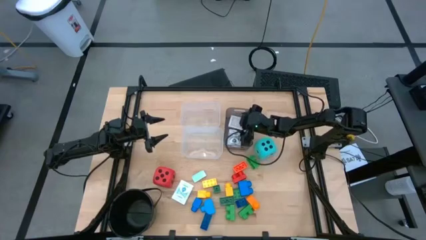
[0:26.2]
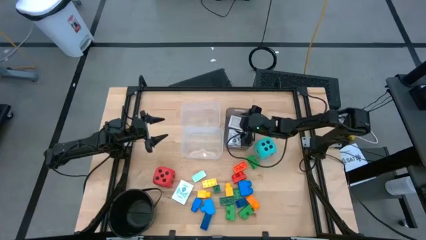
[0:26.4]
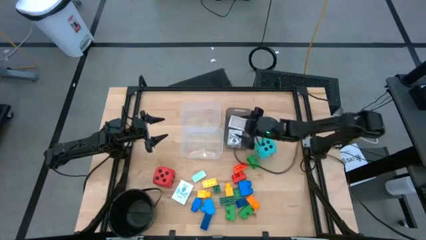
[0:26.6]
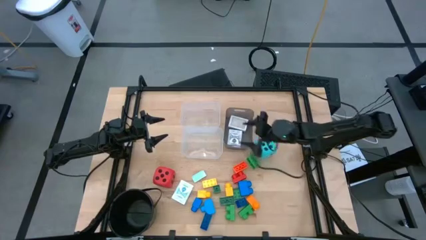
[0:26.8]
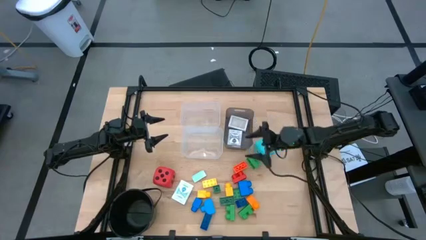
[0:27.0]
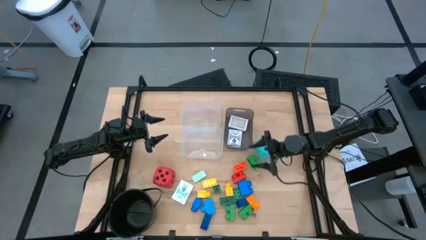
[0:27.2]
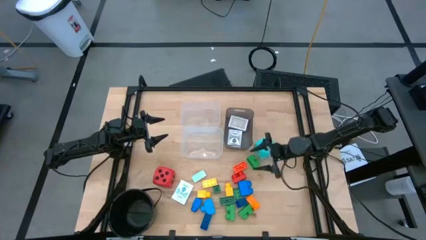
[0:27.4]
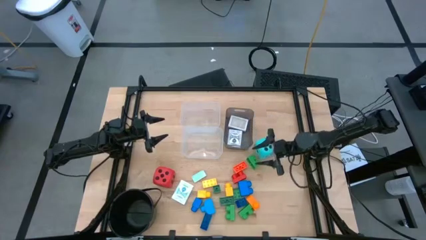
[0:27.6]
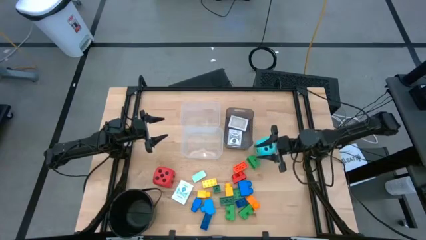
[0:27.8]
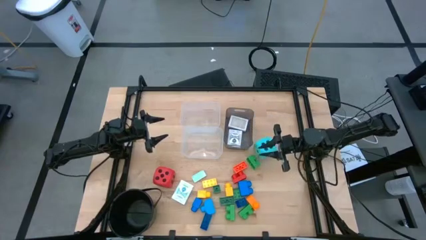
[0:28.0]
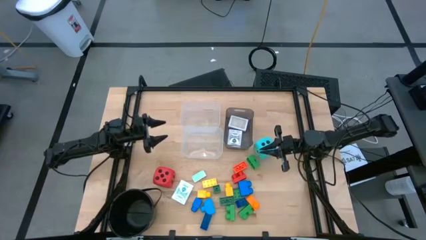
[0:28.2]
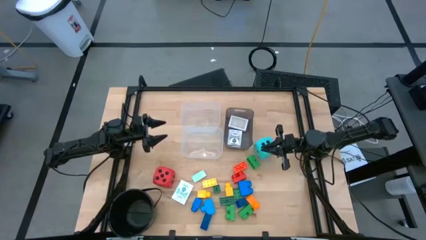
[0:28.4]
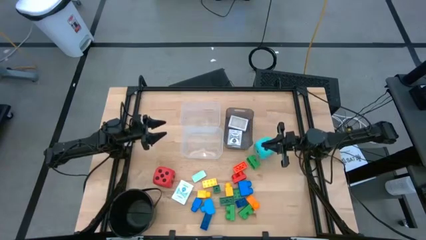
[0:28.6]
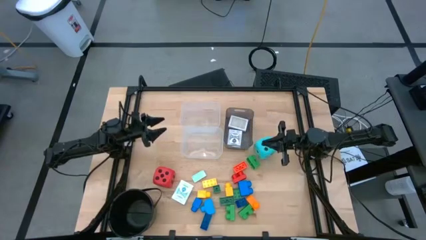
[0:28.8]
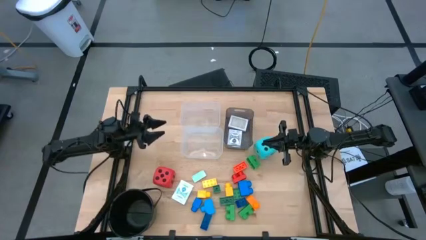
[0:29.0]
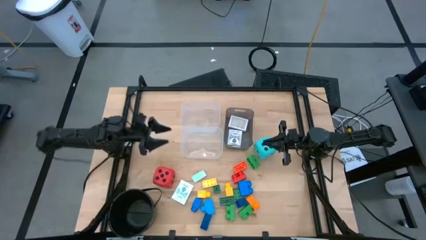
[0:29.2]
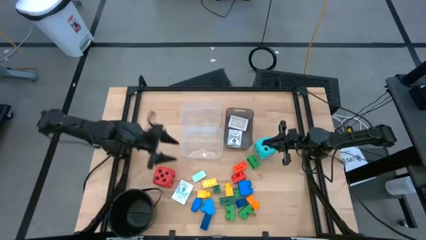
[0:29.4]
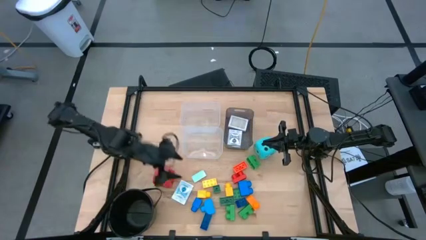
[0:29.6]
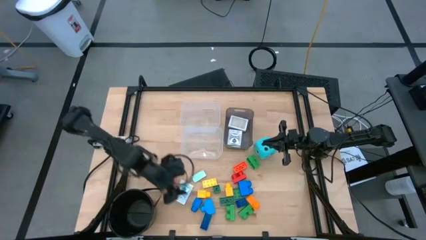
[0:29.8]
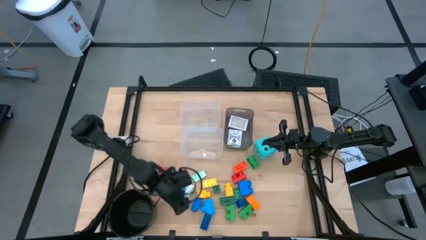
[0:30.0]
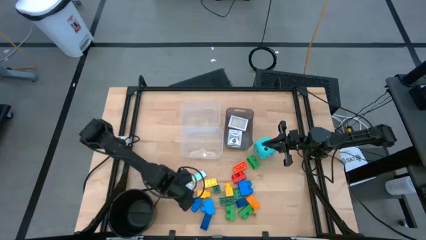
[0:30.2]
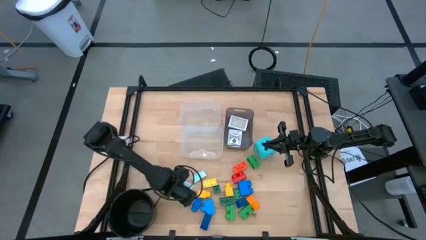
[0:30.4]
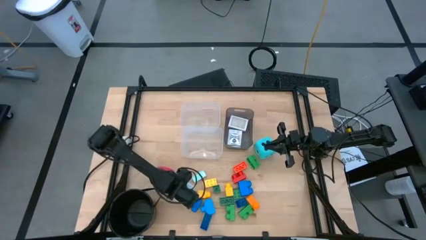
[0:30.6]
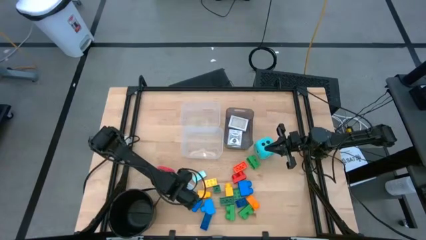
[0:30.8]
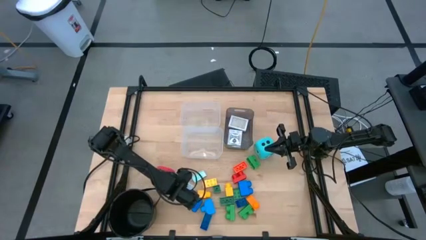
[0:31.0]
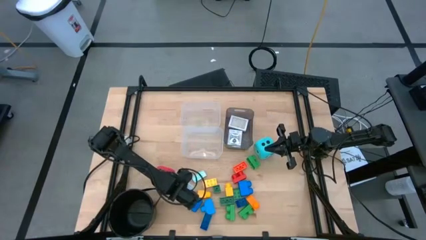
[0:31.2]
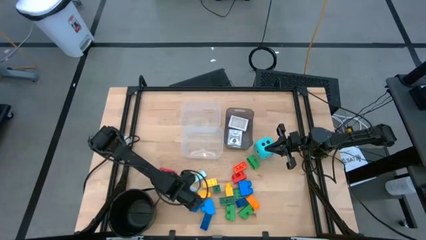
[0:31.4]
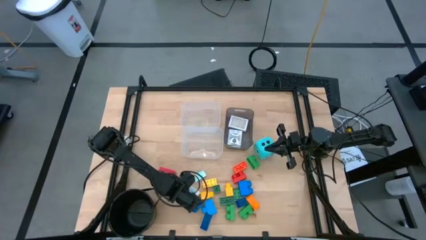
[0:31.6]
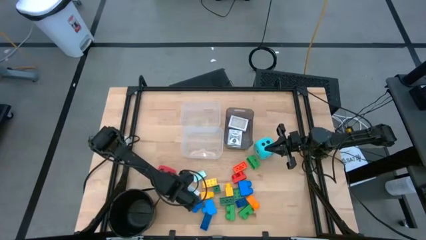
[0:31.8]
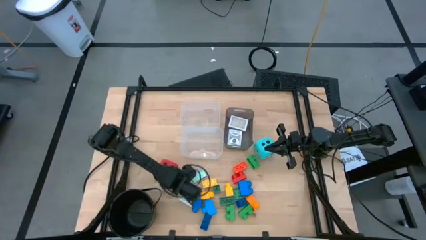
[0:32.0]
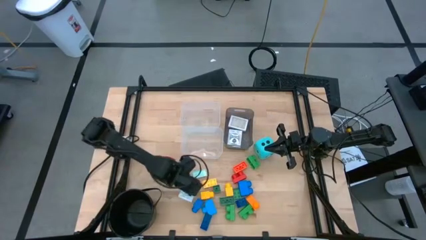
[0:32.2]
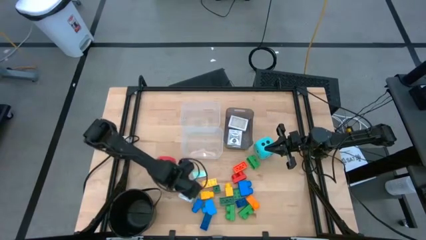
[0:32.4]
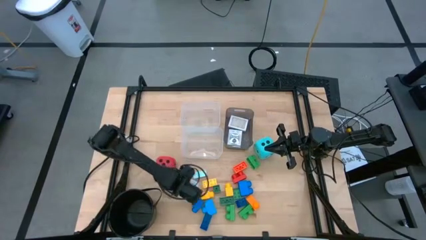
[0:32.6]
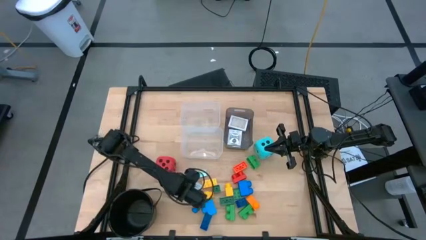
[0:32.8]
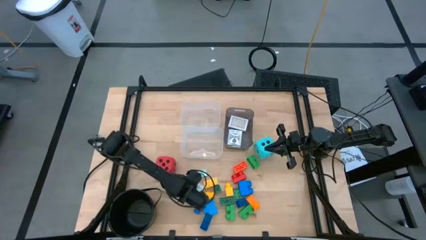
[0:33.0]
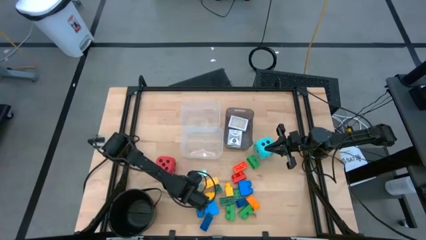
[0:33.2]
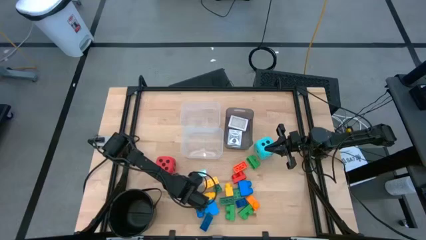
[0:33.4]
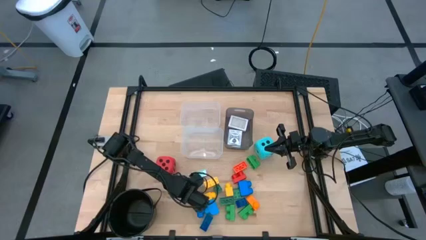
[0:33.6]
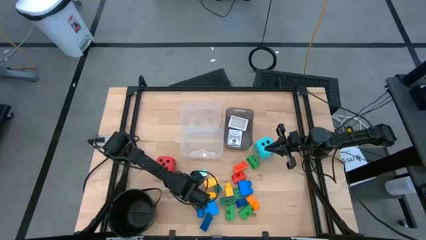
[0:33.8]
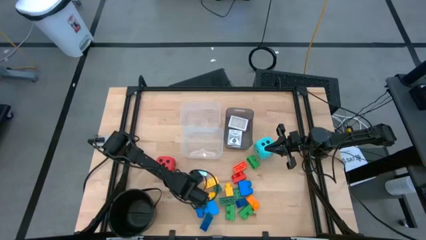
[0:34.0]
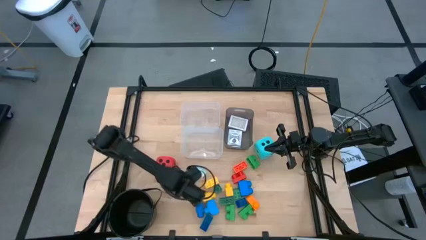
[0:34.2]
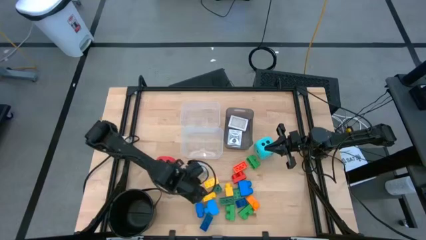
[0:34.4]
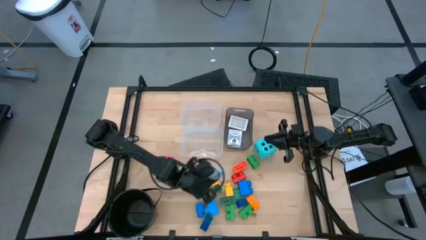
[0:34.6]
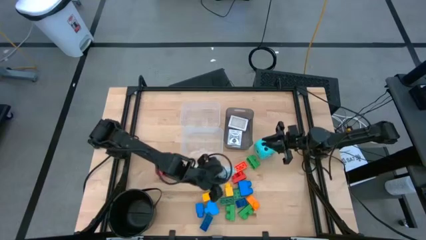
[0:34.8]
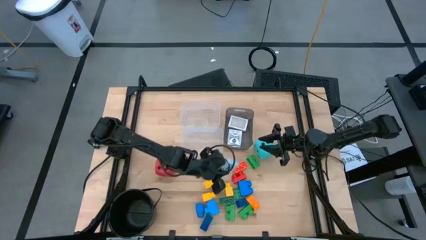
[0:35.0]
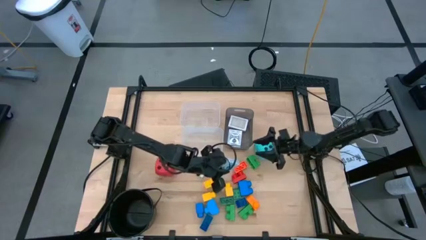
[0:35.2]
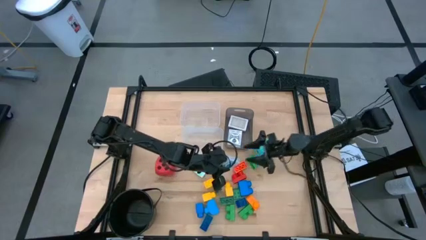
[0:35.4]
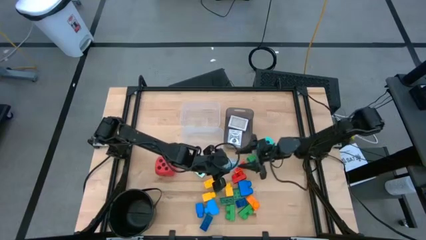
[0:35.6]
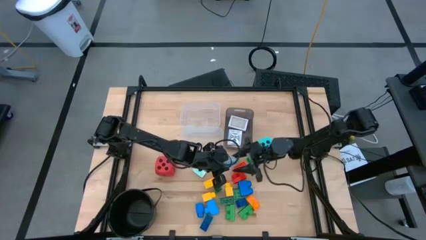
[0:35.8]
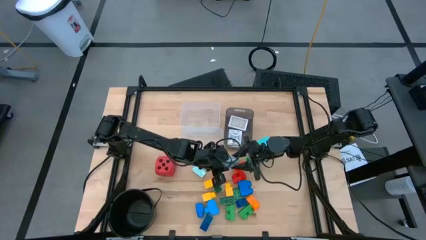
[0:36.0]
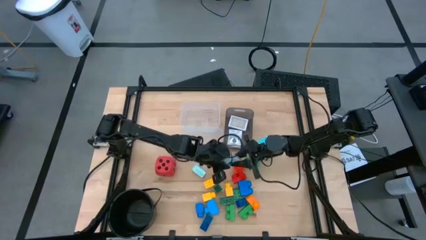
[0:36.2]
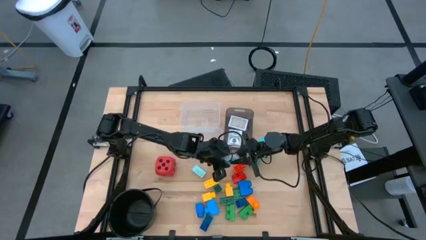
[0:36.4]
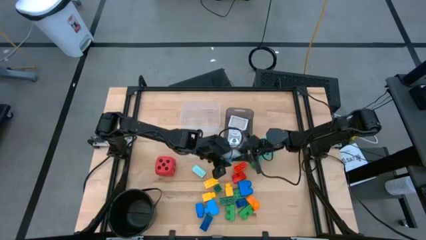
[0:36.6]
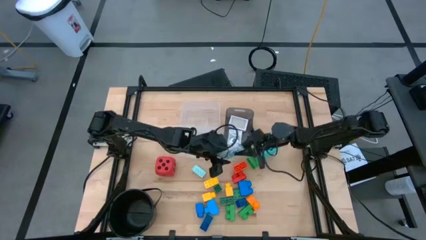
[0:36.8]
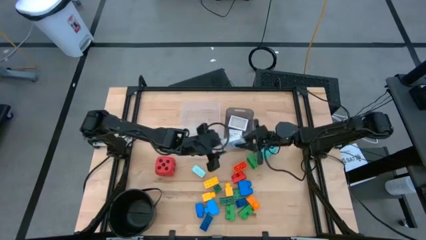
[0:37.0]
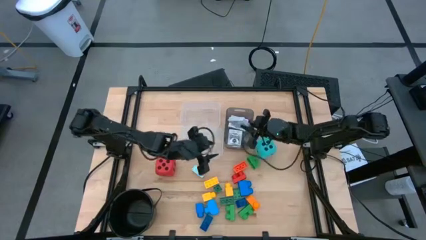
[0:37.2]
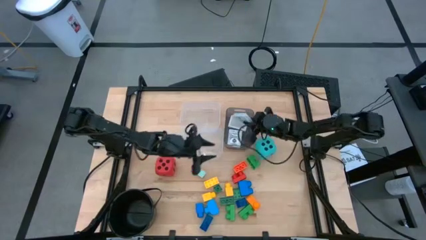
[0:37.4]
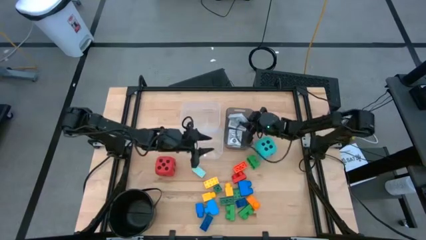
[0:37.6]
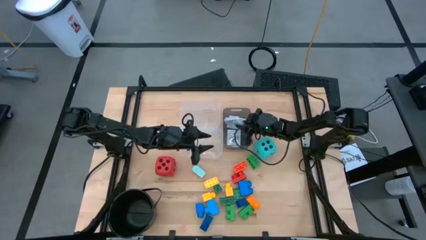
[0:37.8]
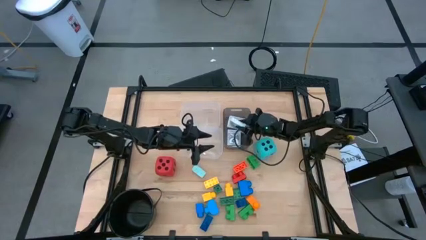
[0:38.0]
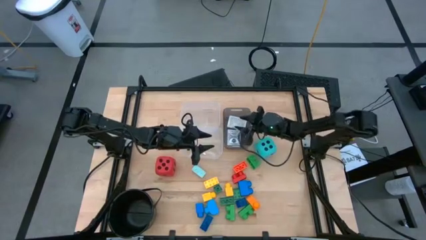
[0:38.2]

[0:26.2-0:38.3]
Task: Pick & Place Toys
Put the blue deck of cards into the black bin

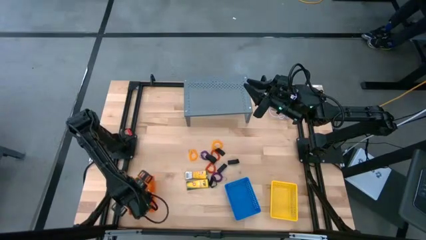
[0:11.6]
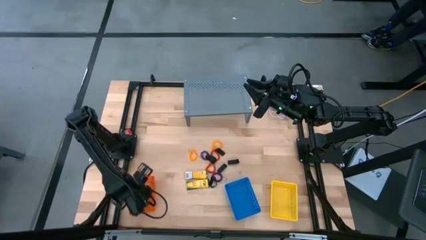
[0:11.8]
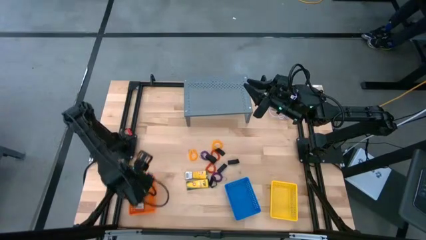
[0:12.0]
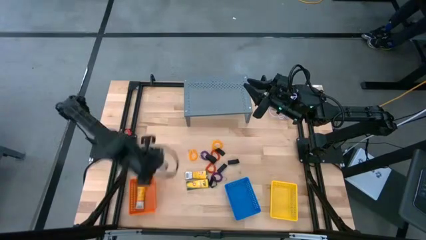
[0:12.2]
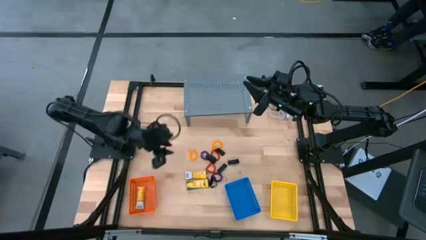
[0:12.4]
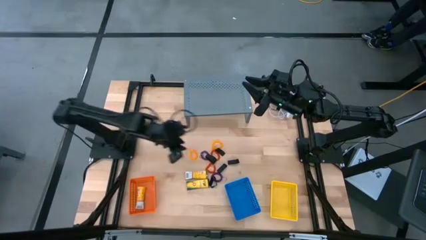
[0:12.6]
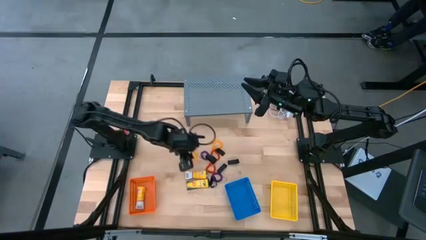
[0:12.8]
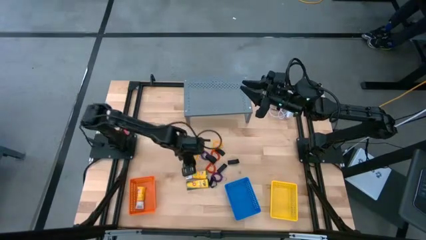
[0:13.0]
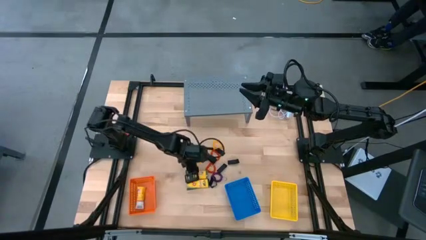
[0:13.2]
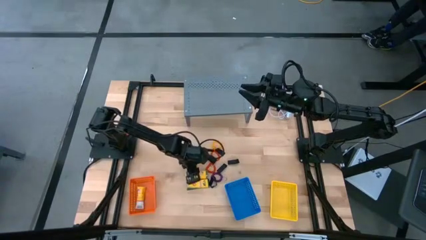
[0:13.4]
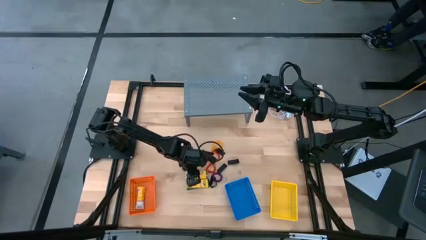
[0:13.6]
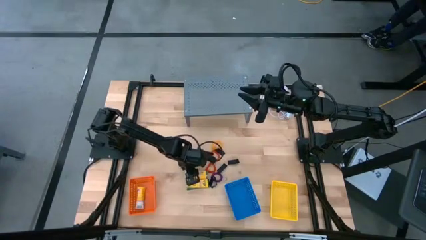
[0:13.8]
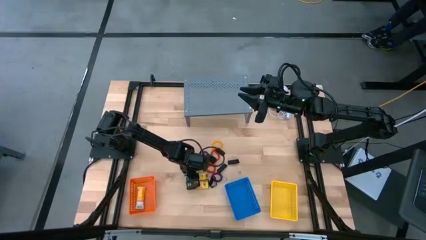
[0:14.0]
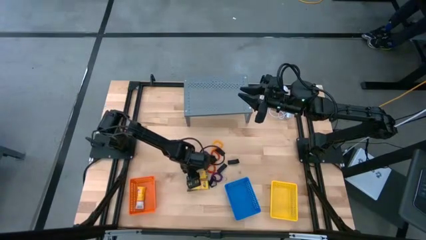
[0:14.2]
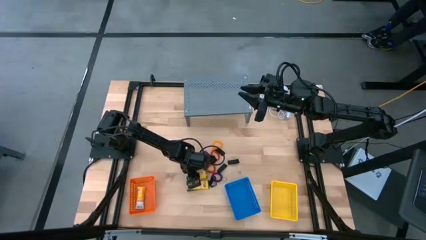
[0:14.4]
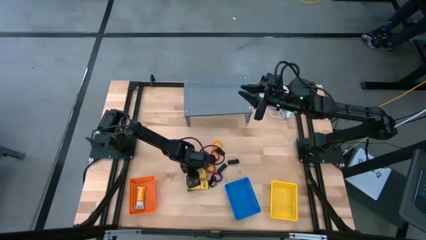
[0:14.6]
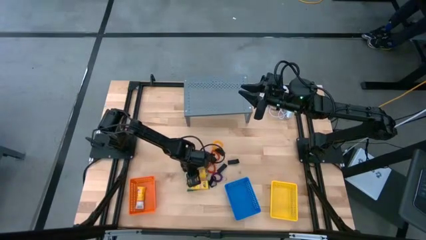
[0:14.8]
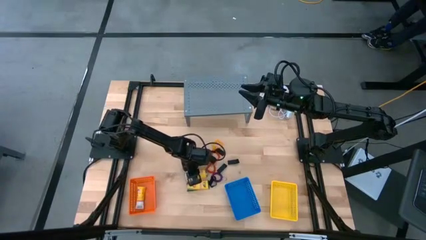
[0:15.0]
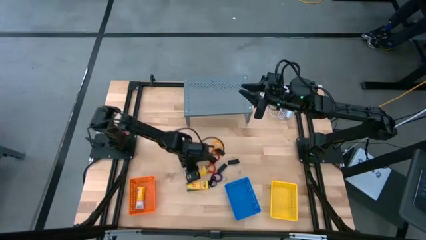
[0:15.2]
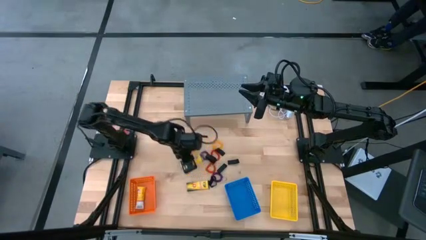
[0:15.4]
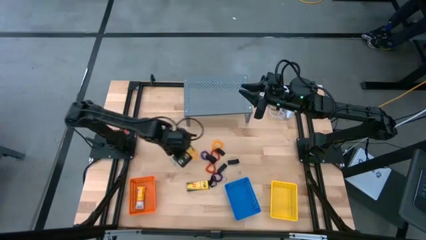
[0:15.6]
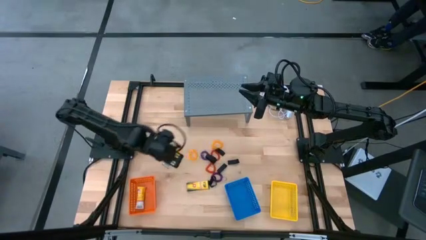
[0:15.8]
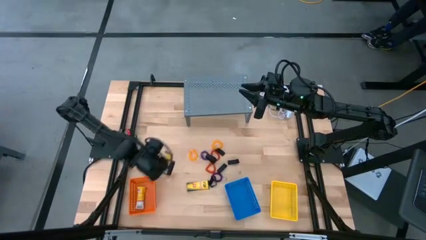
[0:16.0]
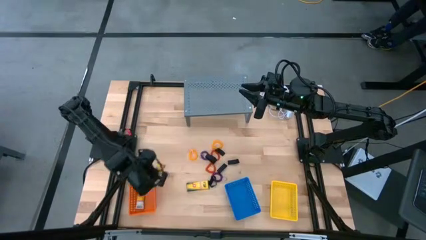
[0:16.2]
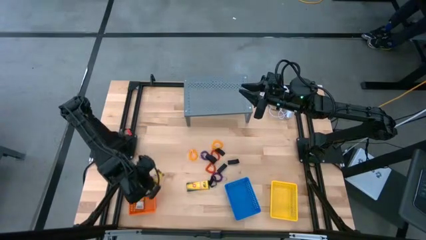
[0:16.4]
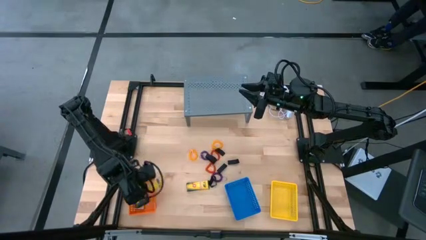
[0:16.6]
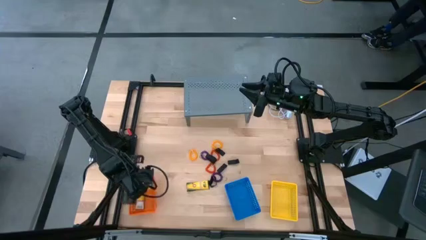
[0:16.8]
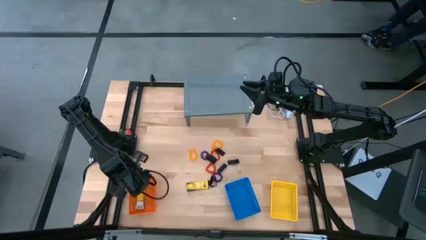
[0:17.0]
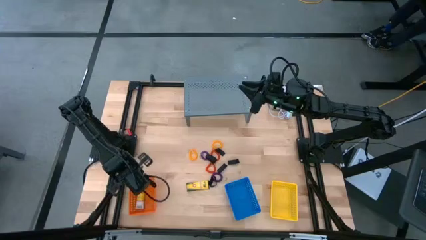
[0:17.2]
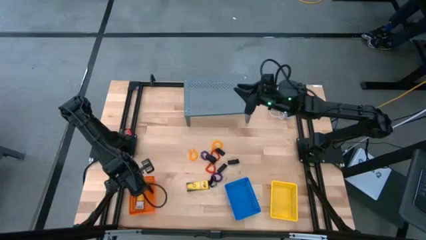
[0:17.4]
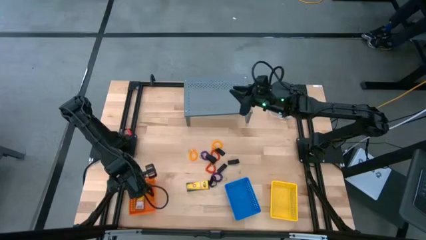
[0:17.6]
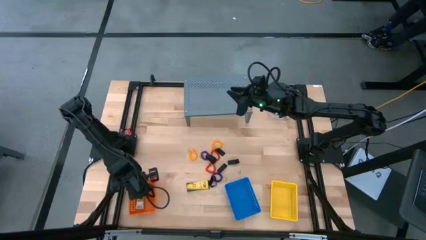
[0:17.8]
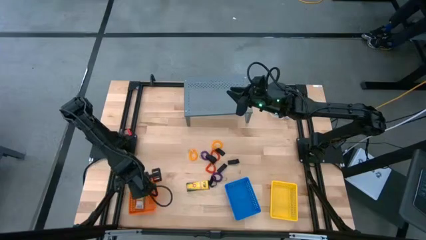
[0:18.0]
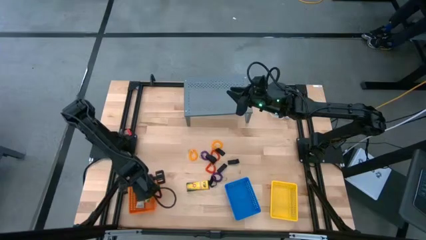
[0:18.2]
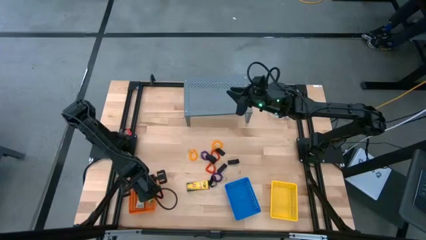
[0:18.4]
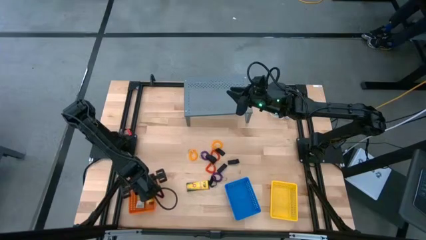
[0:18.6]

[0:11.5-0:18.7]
Task: Pick & Place Office Desk Supplies
Put the yellow crayon box into the orange bin
